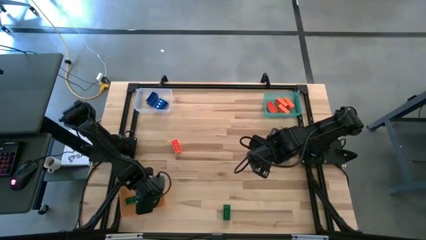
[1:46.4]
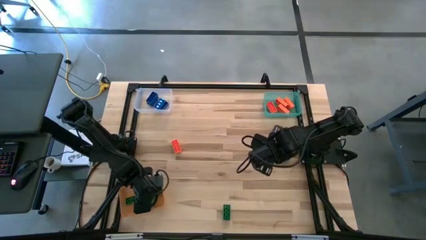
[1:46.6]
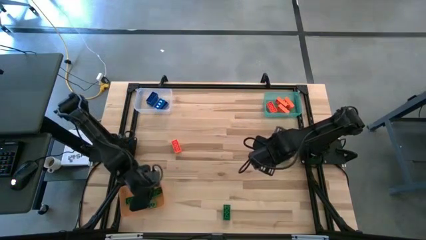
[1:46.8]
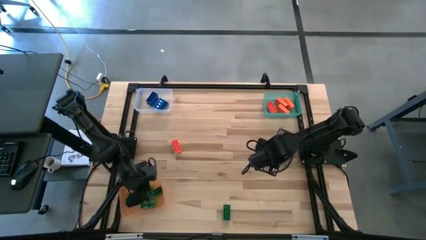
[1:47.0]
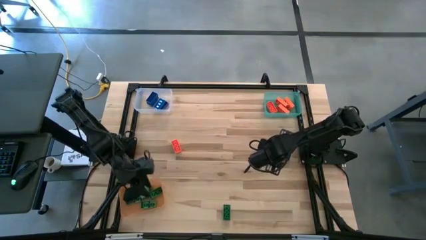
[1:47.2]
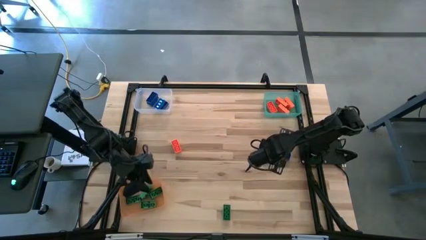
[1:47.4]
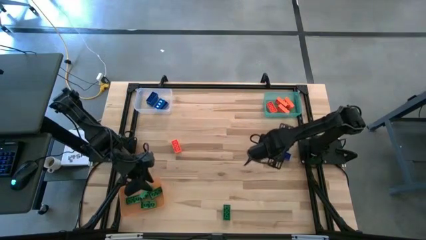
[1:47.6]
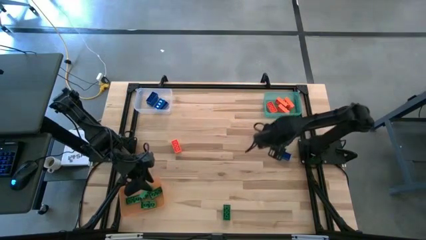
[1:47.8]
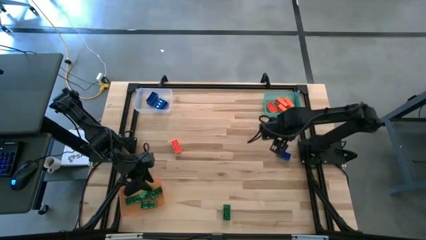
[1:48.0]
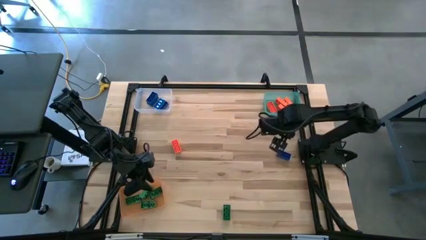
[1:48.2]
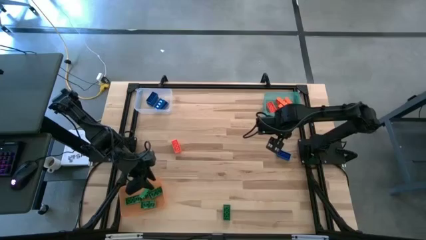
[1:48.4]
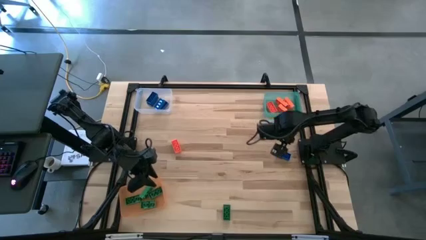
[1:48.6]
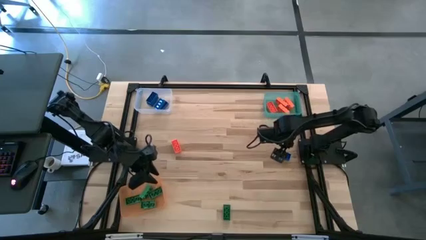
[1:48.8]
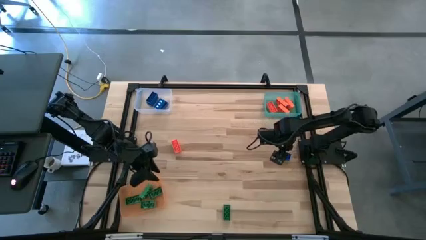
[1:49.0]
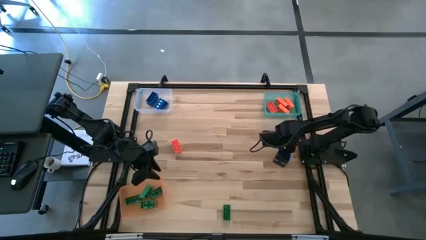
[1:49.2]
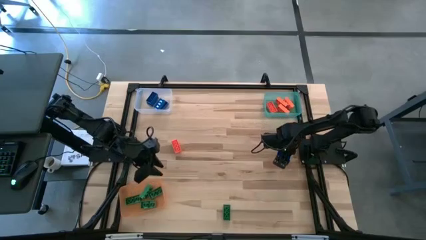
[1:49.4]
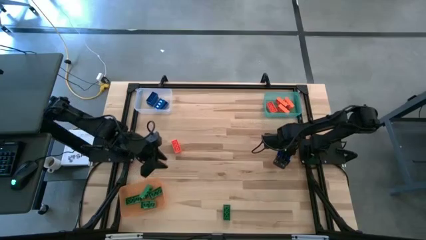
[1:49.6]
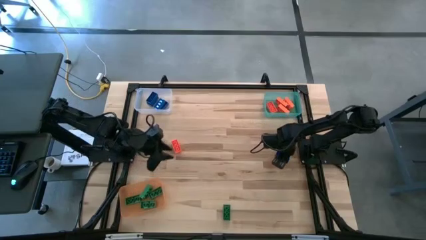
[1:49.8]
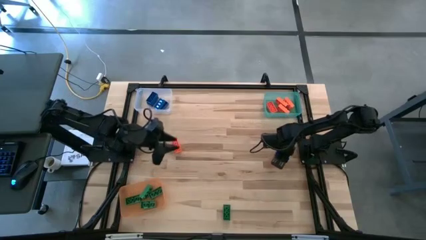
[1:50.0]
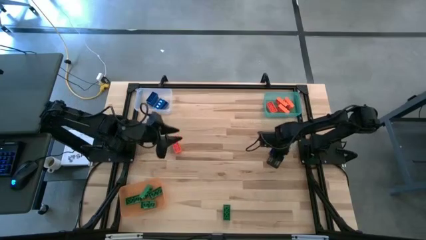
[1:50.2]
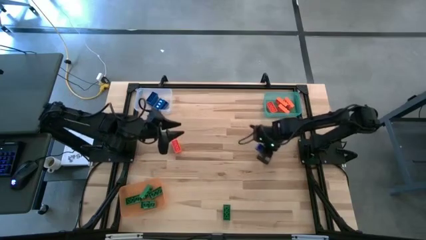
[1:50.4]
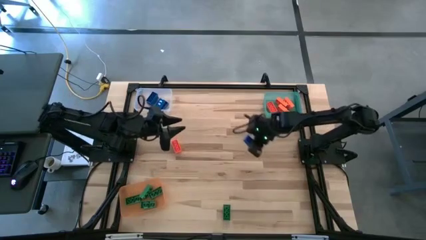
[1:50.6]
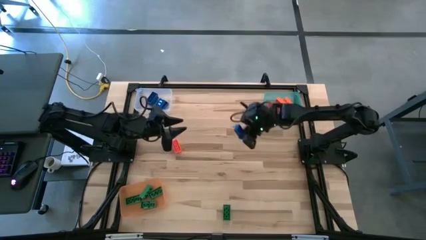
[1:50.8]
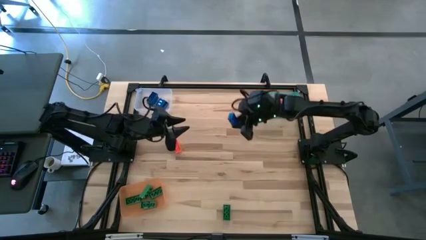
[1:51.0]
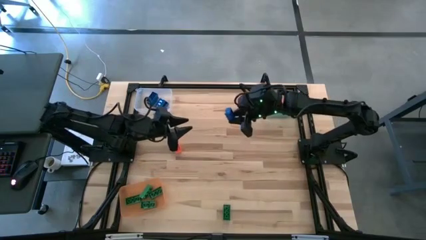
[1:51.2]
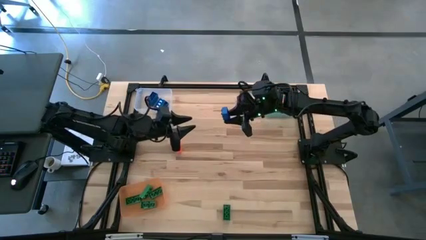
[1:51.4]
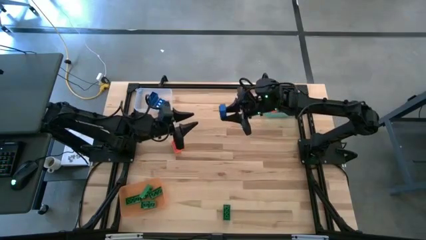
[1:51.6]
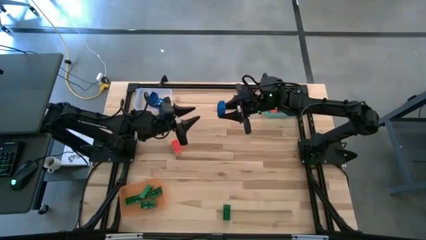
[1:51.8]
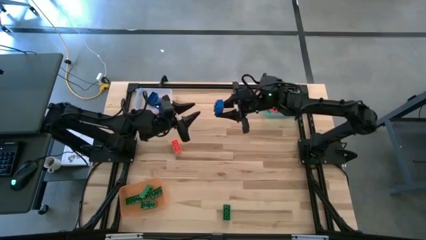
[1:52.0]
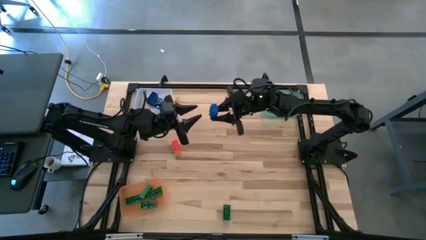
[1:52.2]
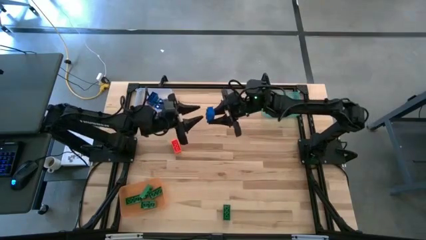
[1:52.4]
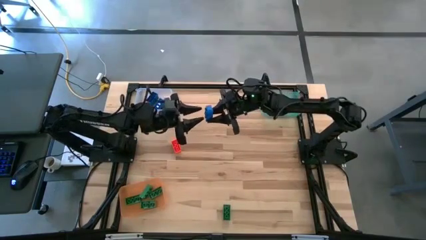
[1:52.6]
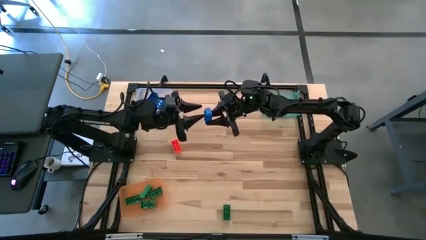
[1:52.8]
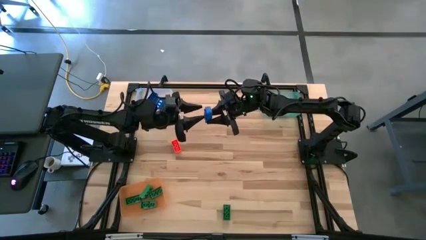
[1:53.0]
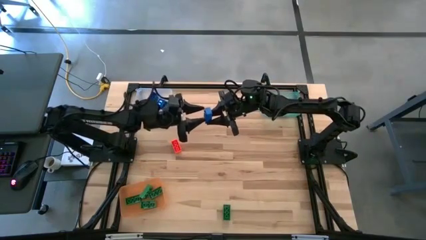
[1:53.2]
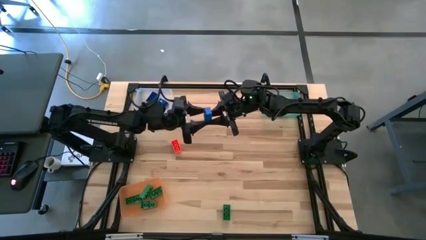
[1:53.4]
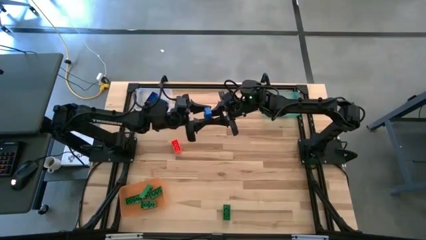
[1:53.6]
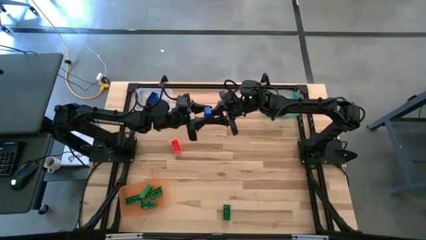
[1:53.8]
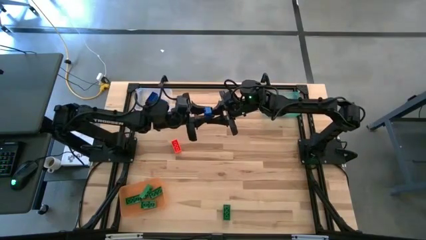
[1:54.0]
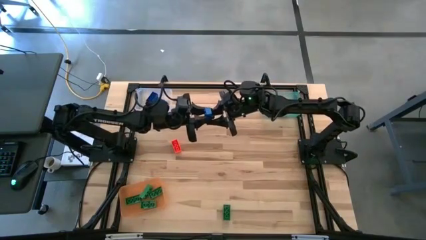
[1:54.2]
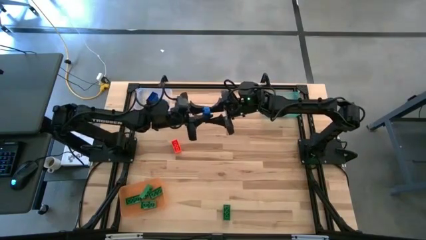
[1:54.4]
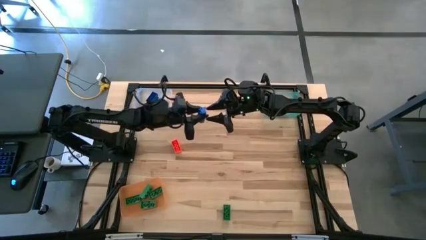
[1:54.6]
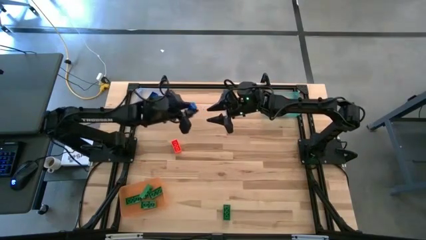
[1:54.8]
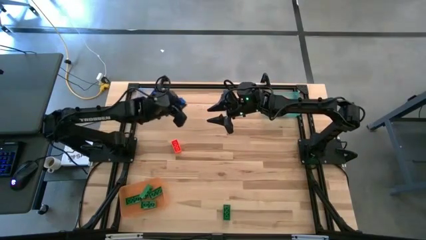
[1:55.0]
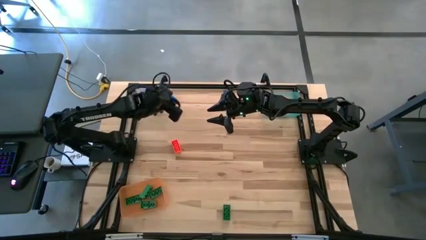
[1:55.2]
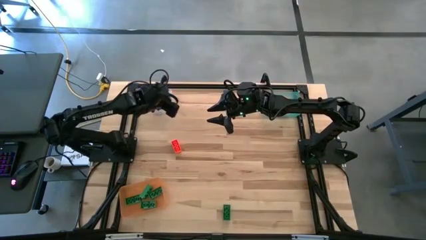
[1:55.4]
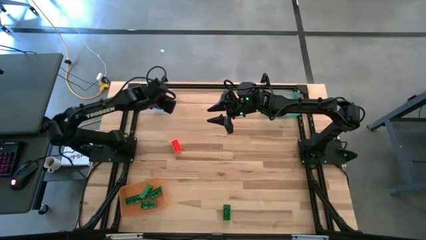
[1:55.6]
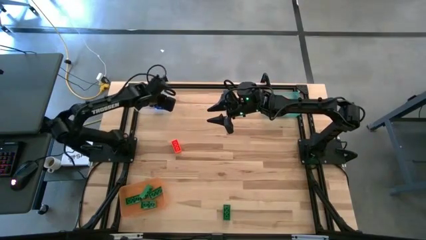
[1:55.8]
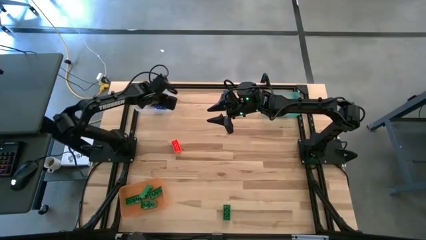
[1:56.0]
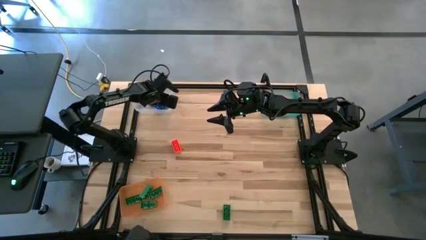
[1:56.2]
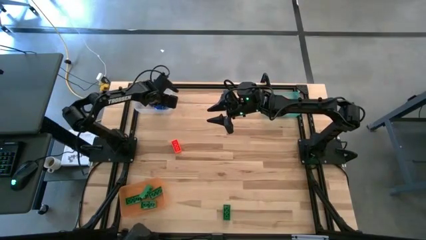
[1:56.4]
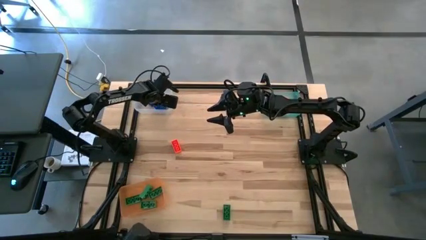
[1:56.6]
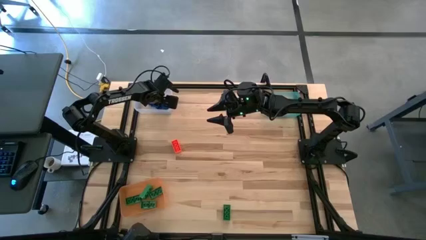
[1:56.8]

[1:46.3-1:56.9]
Task: Sort & place blocks by color
Put the blue game piece into the transparent bin

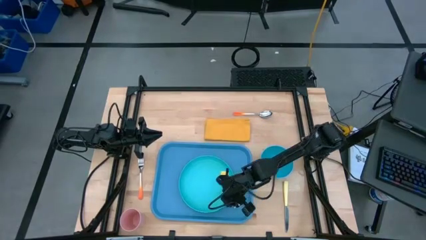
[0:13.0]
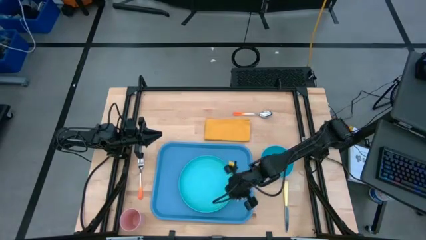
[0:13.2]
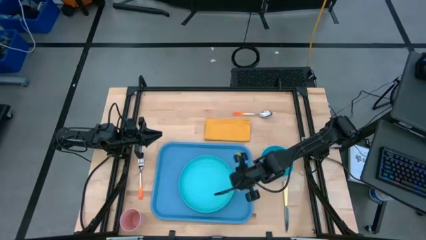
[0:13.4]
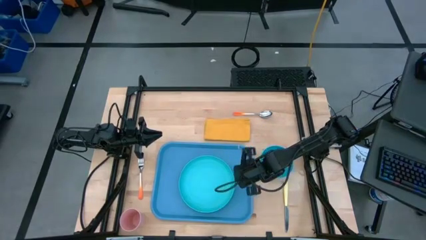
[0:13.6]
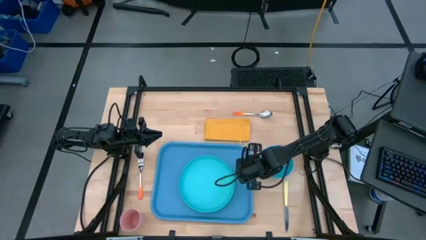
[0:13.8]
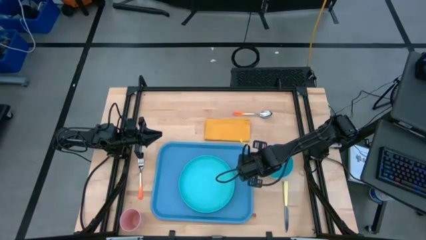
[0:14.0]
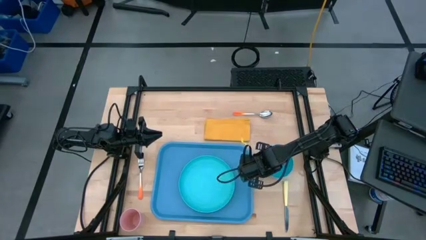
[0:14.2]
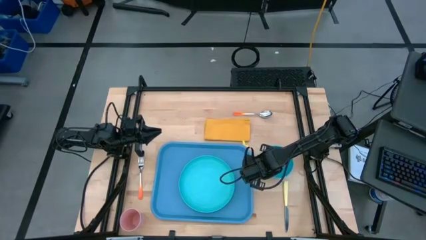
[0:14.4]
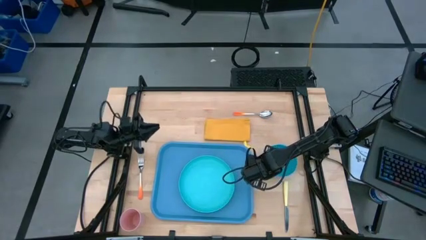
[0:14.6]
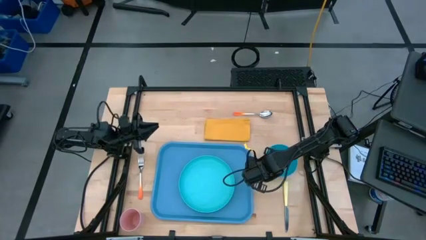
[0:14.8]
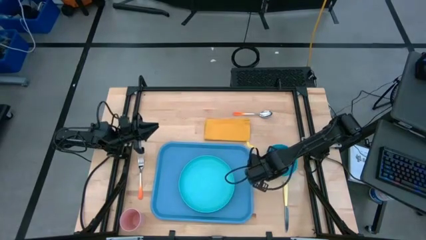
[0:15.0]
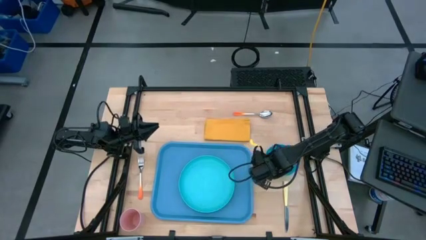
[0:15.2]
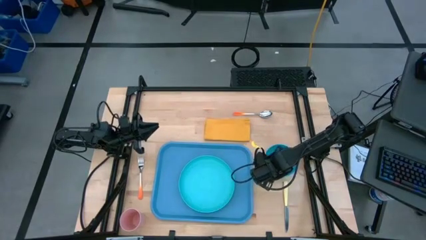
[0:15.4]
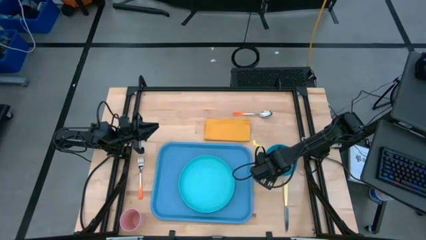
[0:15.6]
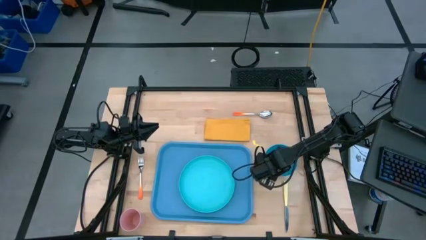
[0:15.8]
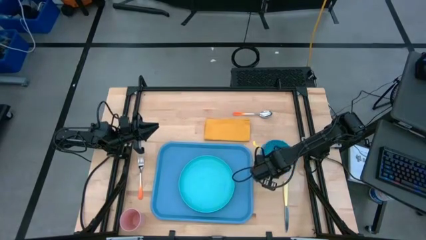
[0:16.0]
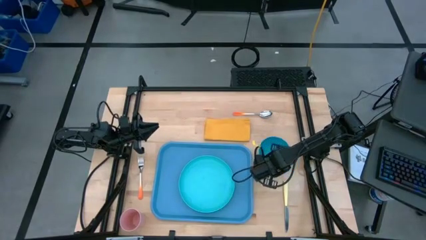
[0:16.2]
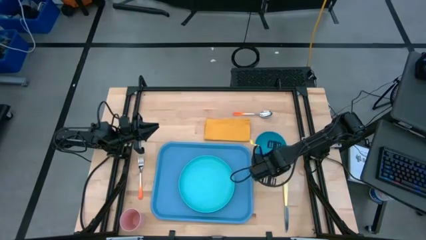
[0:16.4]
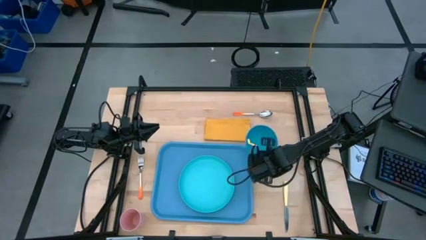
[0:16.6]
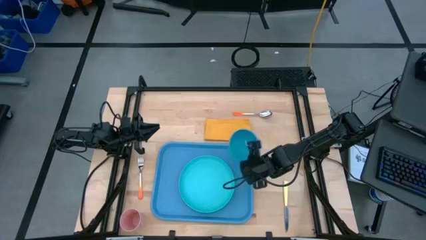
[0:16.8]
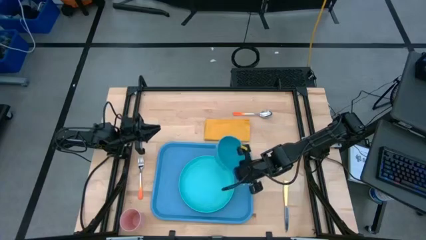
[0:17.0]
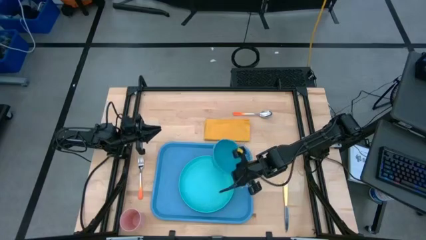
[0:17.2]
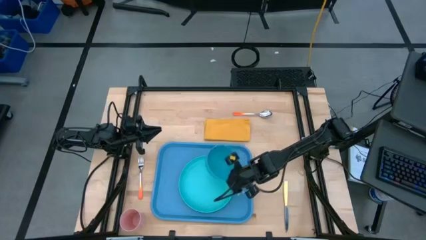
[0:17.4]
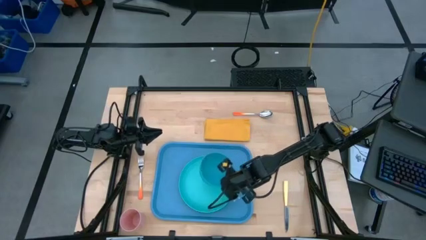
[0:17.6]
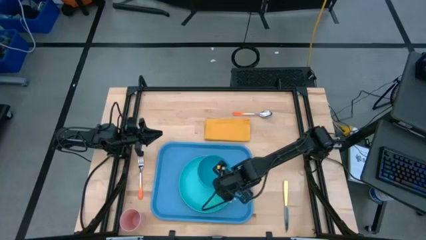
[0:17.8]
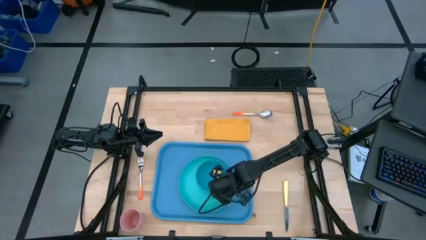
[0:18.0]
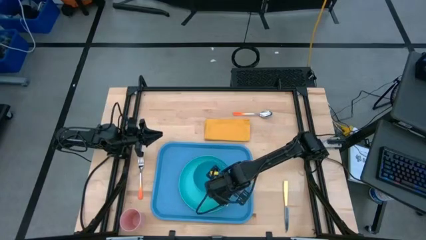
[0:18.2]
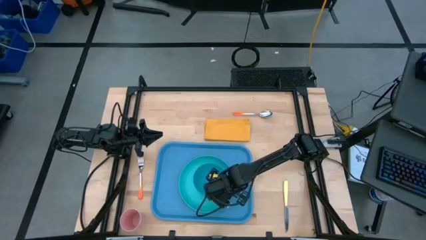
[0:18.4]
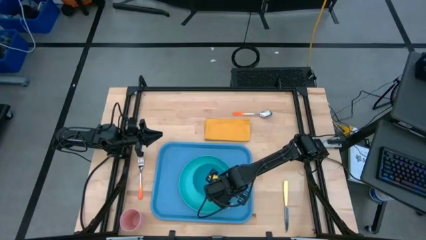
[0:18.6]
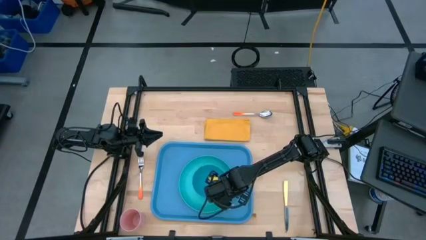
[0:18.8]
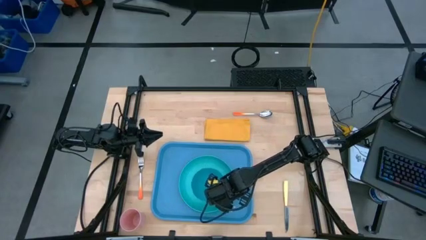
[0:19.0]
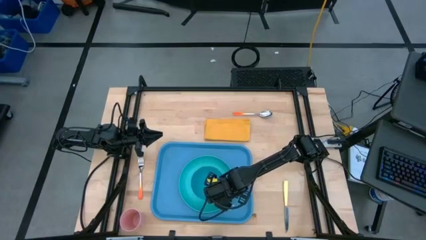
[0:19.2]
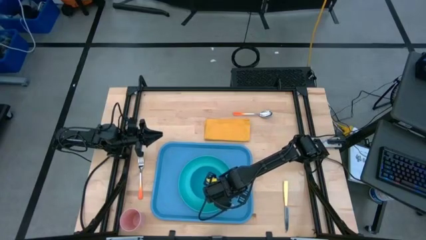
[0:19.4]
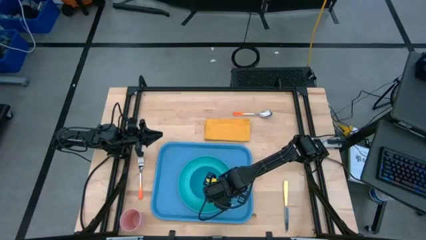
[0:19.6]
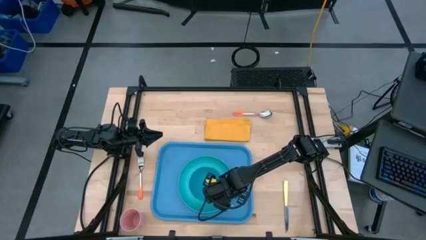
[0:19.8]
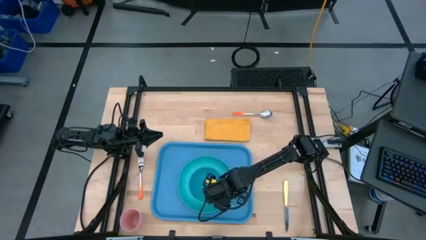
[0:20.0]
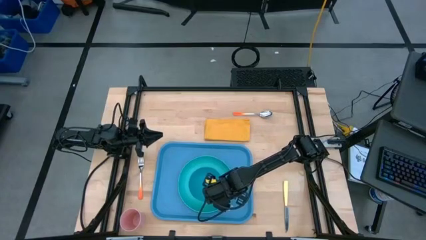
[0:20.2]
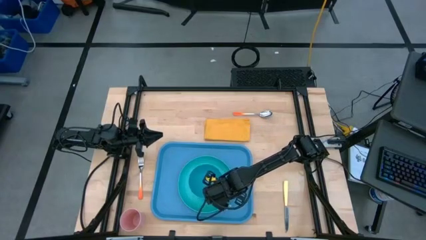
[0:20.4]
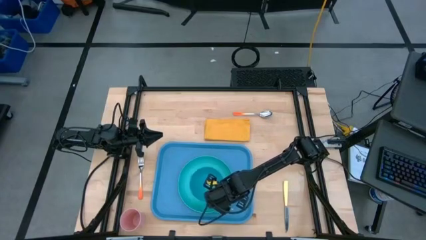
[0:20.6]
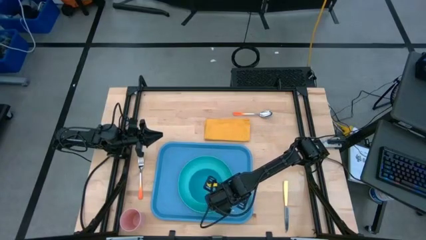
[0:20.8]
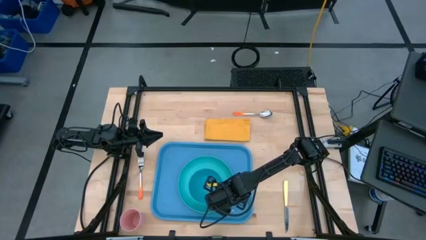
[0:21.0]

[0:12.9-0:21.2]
Task: Set up tray
Put the blue bowl on the blue plate
